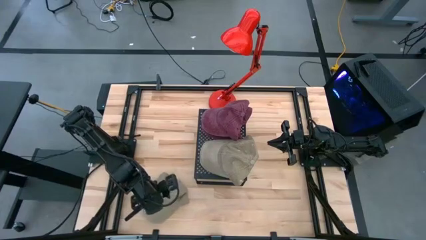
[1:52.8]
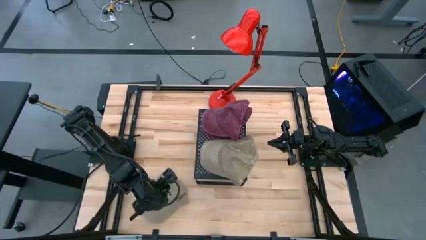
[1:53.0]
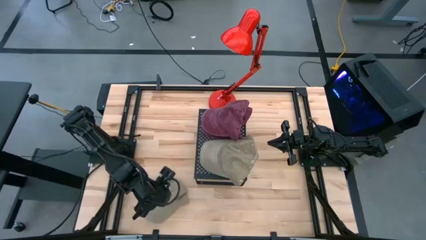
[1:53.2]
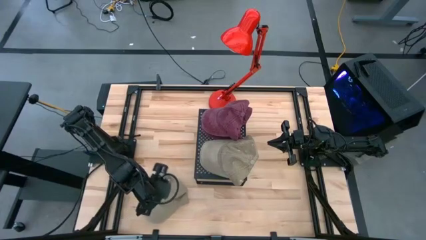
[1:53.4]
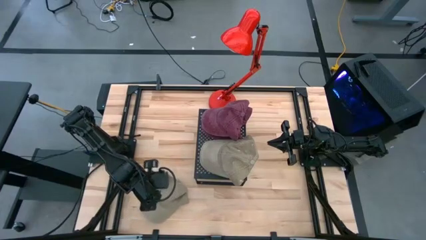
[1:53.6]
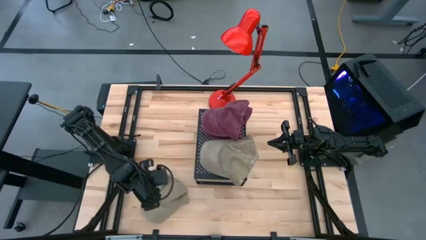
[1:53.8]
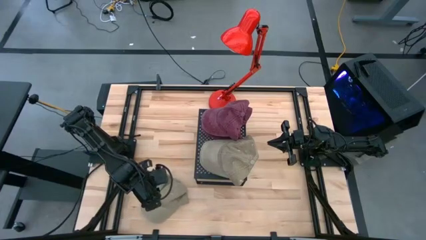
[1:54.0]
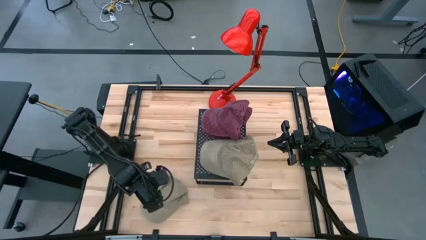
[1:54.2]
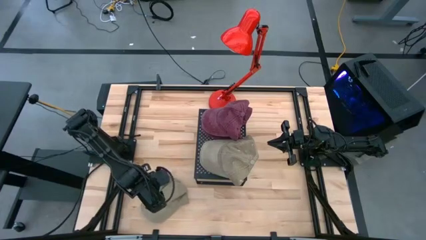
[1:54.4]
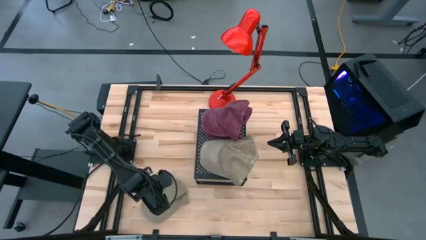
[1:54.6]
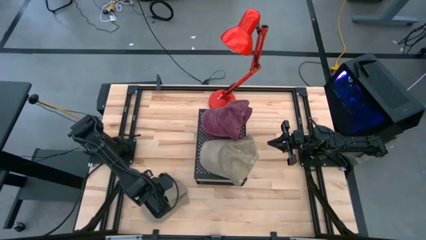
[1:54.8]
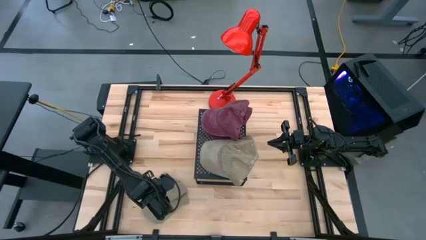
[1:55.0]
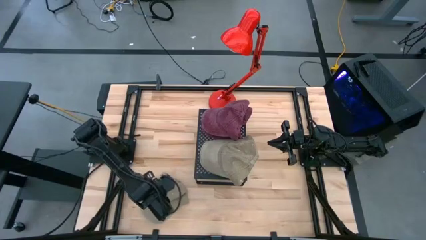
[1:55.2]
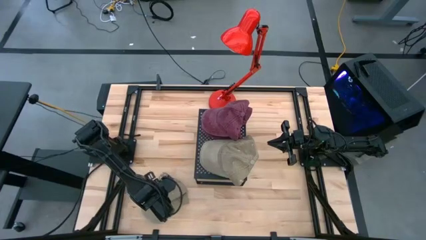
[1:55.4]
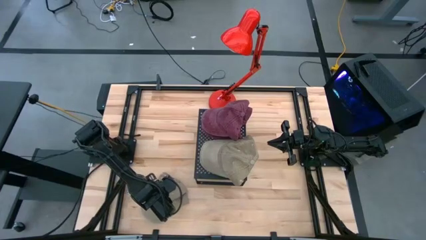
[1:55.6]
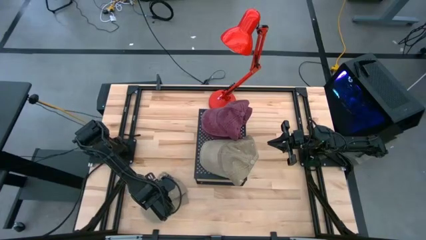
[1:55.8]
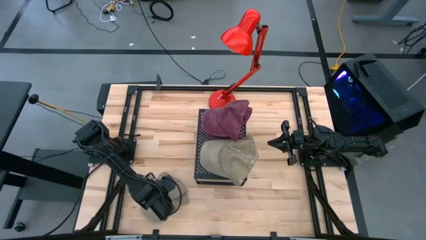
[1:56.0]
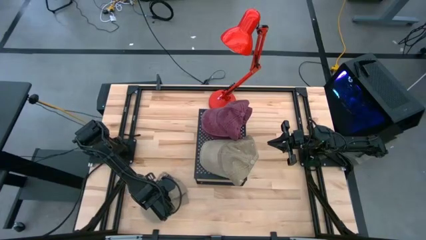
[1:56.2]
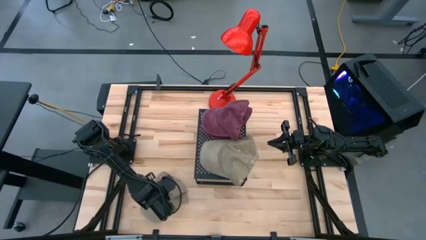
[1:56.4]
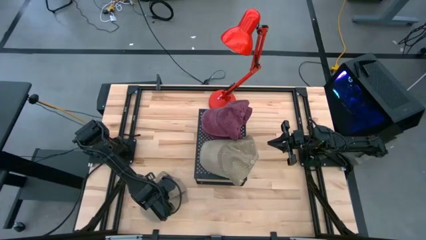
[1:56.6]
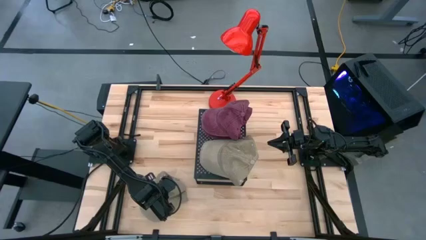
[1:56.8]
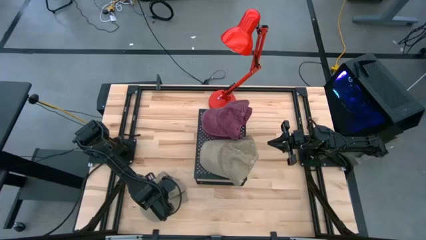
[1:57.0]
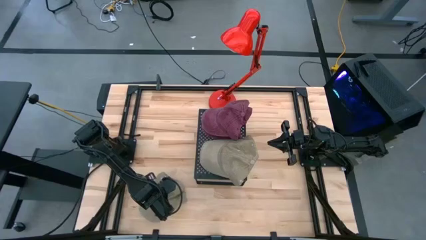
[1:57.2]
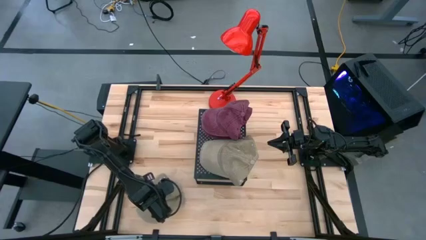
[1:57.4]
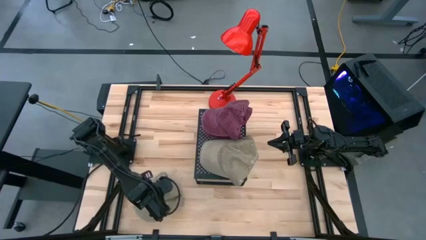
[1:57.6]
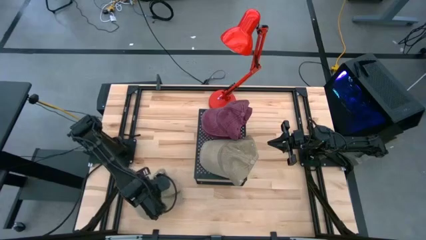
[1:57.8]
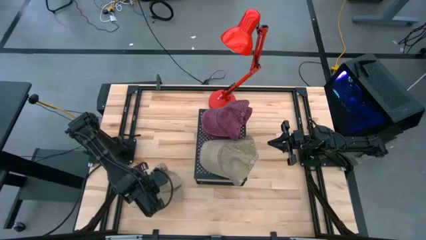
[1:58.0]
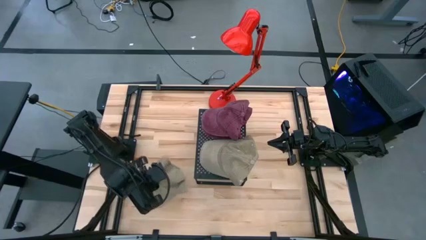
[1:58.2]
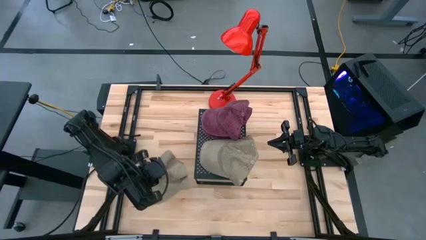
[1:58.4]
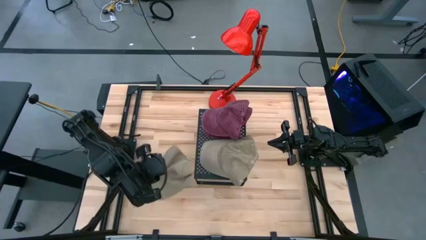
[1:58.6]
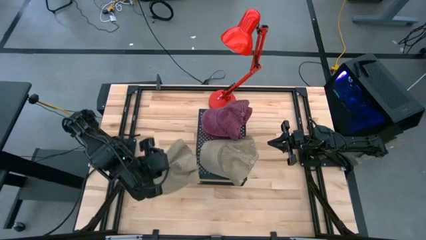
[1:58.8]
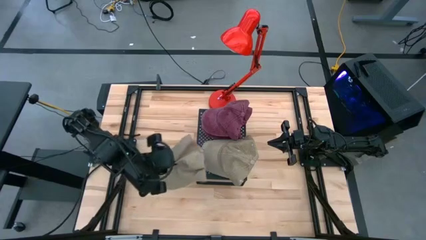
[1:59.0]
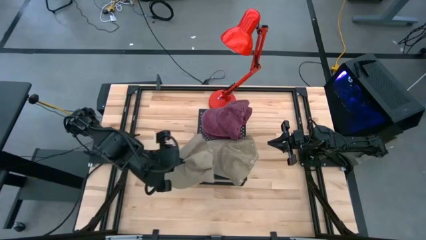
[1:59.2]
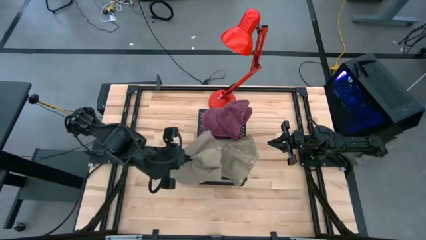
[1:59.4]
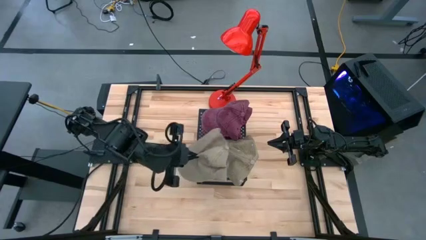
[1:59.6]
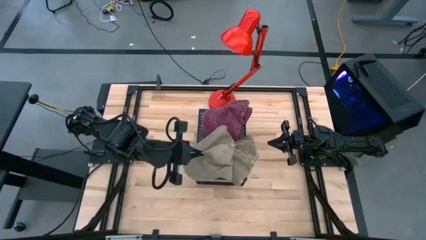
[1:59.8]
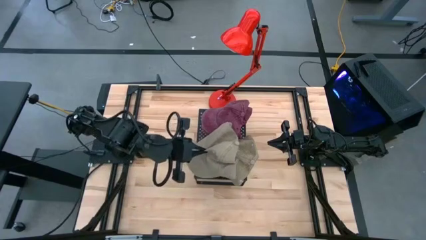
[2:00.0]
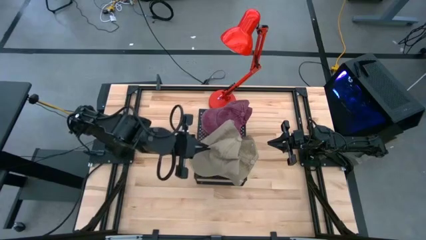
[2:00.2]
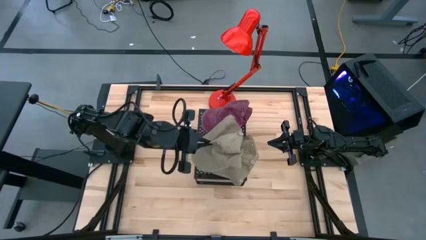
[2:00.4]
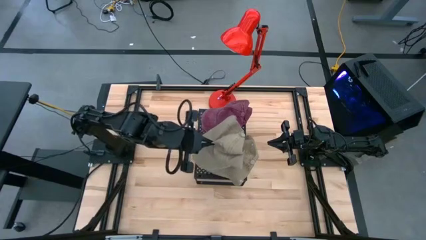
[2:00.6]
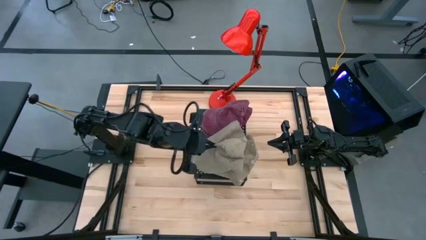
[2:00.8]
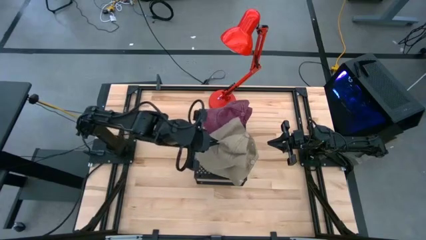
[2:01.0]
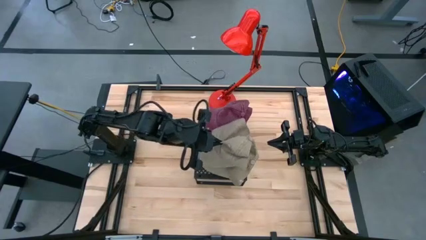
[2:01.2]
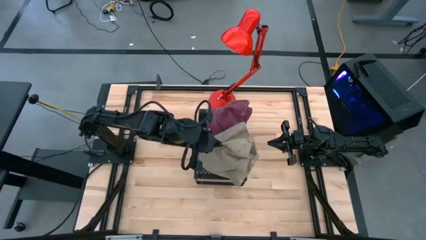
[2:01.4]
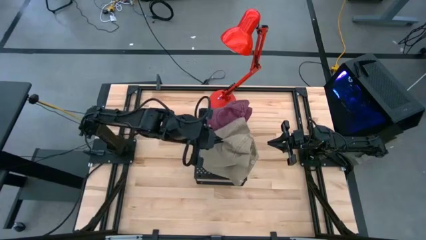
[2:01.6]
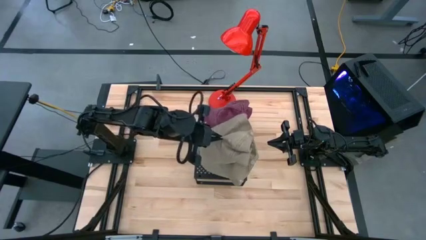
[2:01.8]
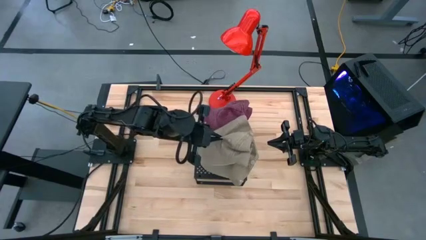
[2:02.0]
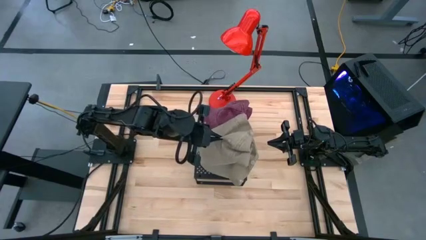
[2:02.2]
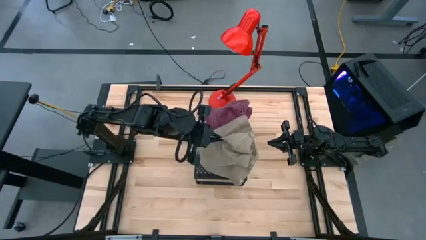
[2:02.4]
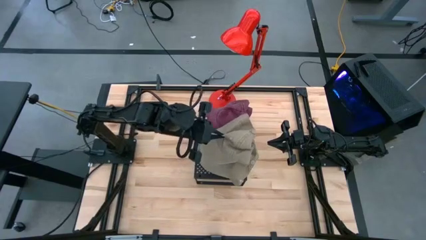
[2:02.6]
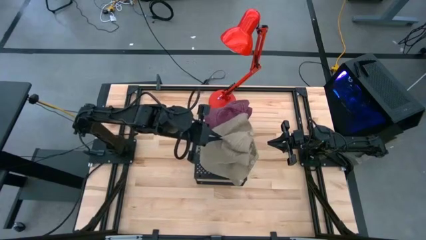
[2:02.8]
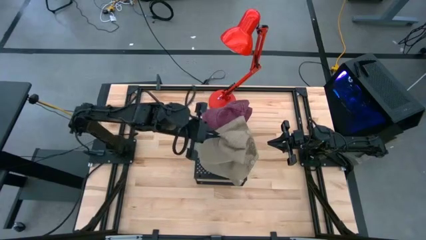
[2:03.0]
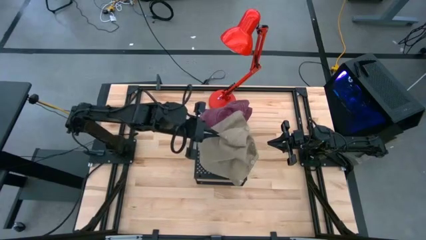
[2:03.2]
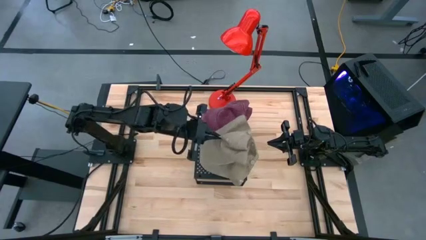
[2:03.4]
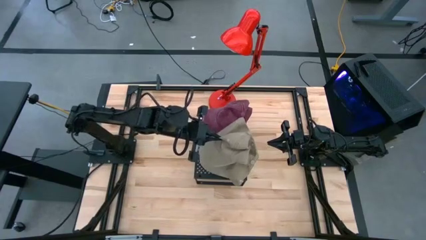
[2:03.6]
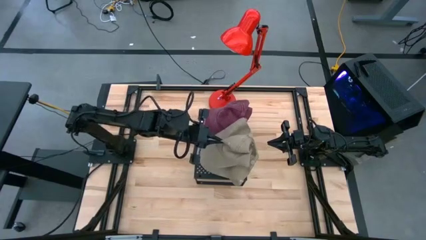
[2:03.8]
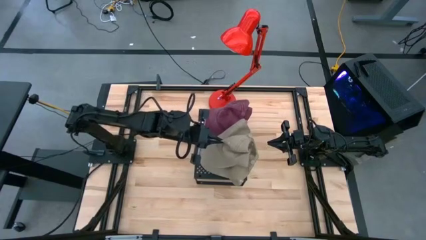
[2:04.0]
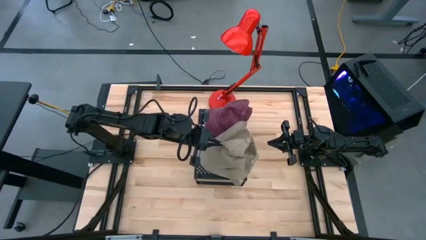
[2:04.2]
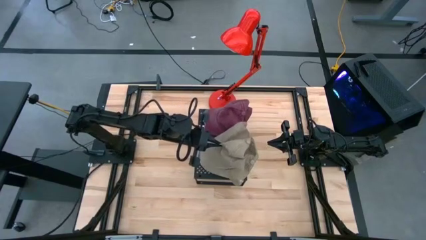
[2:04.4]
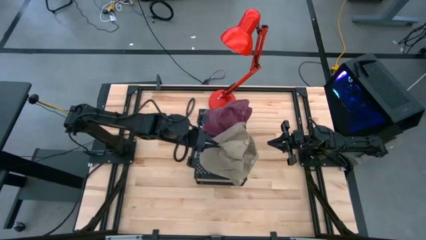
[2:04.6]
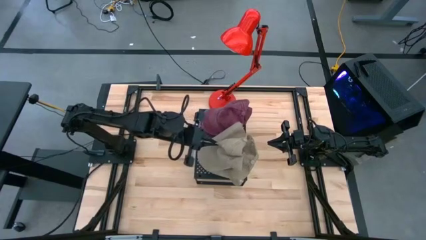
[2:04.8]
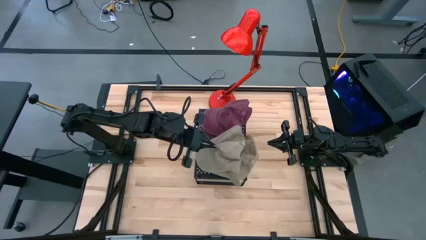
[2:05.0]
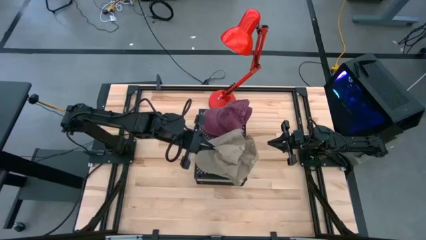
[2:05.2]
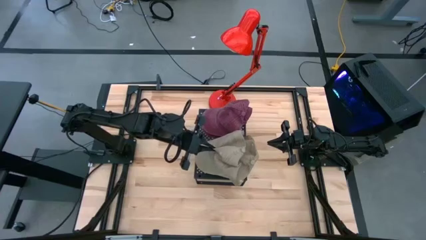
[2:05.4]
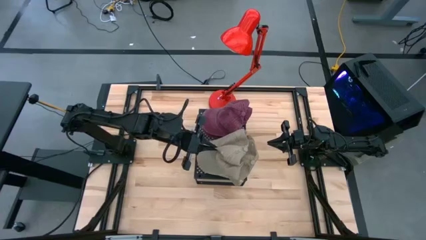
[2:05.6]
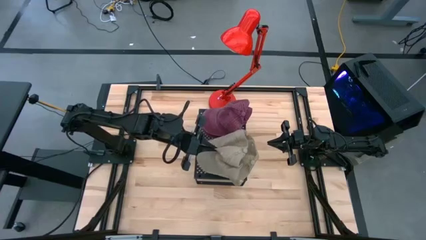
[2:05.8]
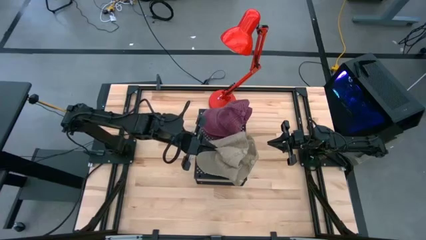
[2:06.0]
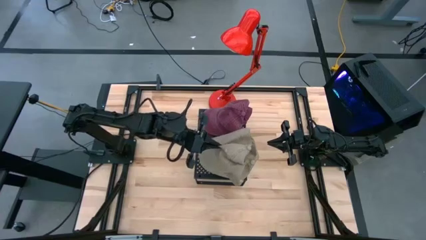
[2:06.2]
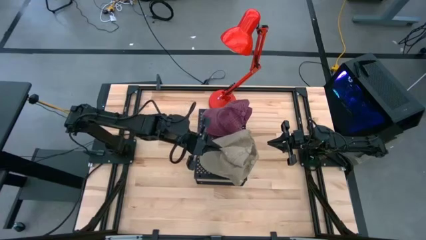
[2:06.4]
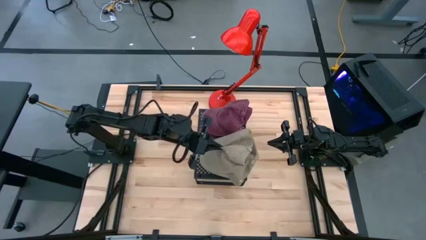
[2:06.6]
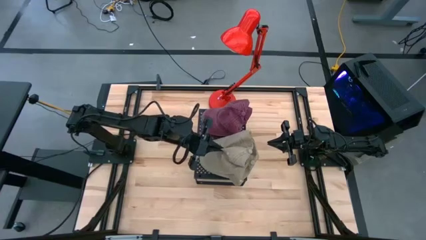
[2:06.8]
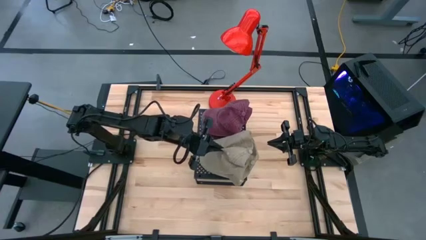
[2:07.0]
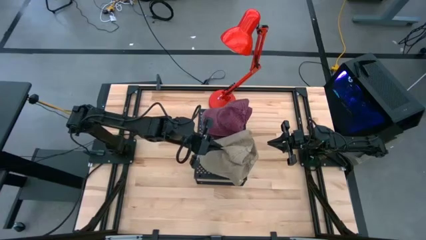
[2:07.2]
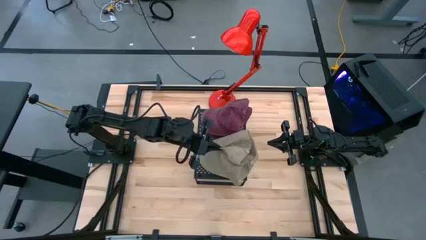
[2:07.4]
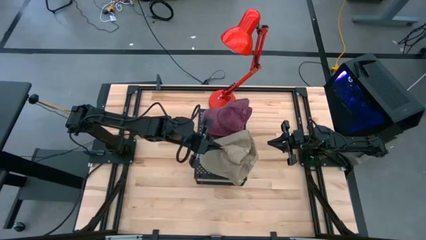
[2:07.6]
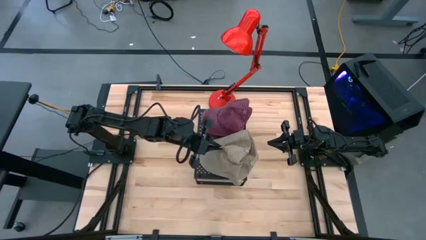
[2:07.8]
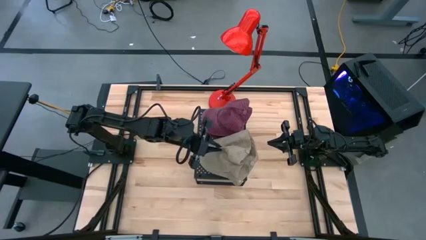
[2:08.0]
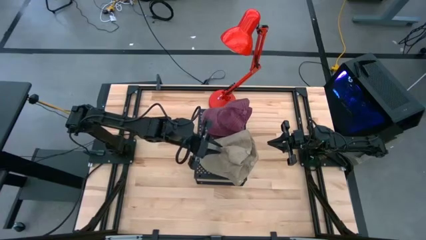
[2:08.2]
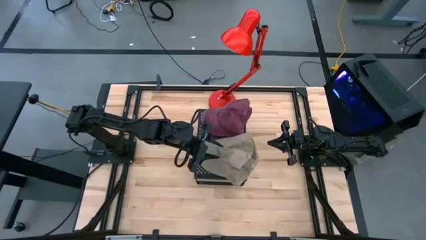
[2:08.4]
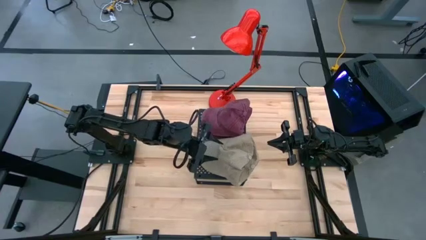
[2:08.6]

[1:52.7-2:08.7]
Task: Pick & Place hat
Stack the brown cap on top of the brown cap on the shelf
